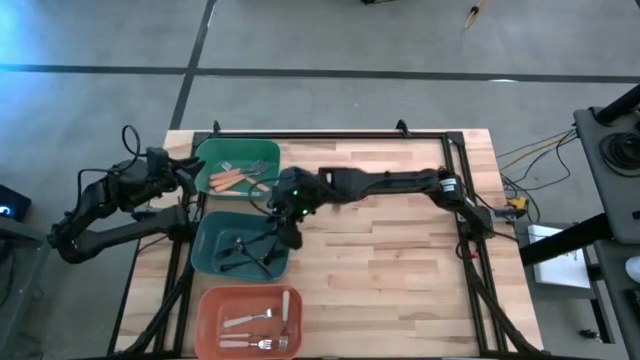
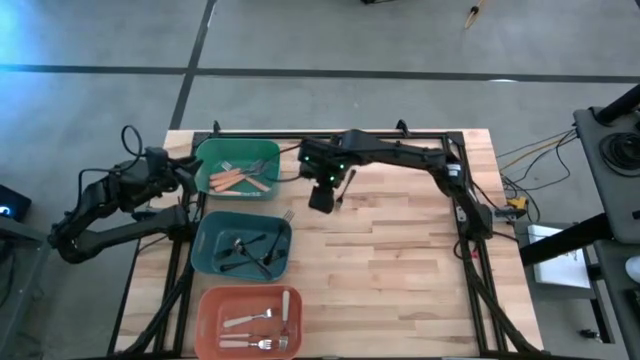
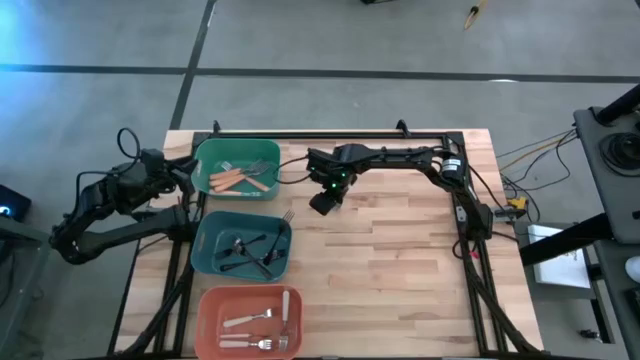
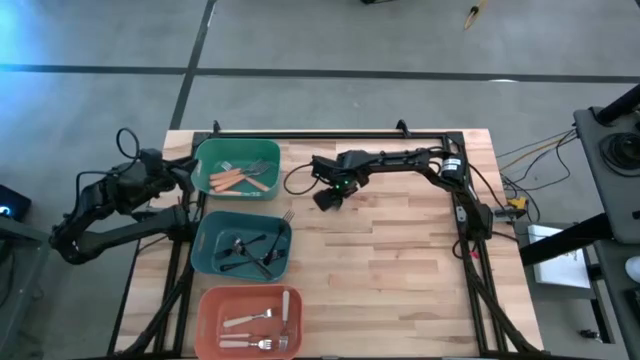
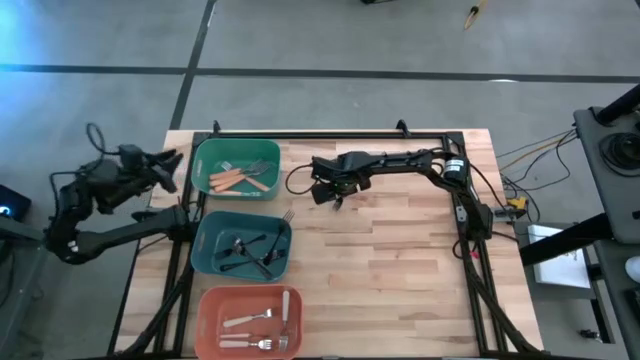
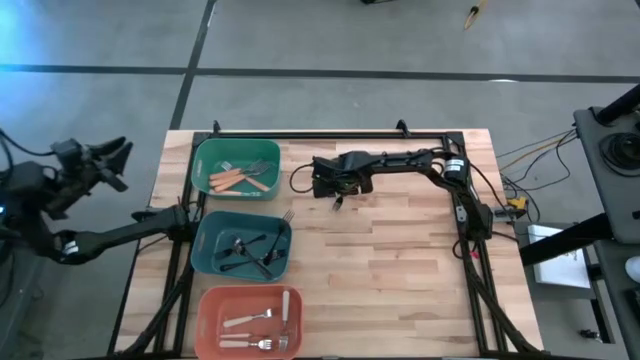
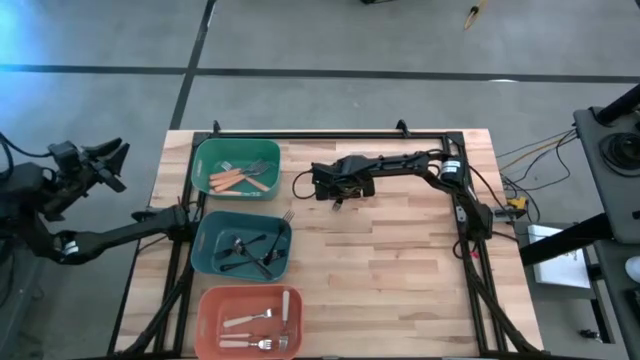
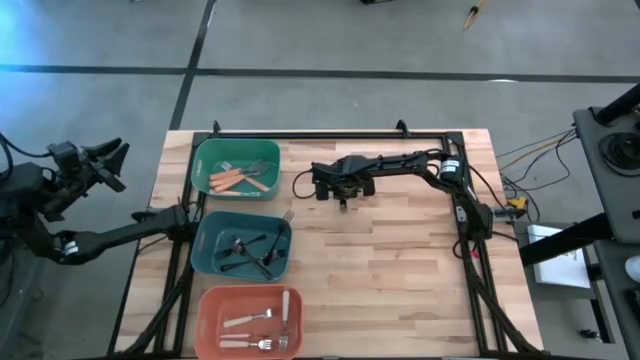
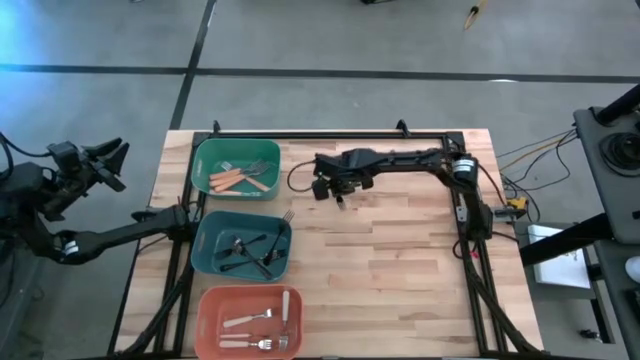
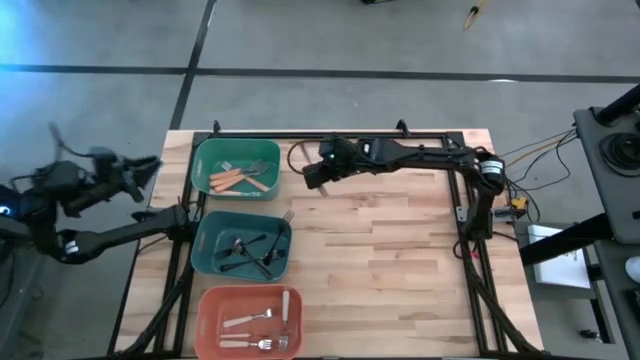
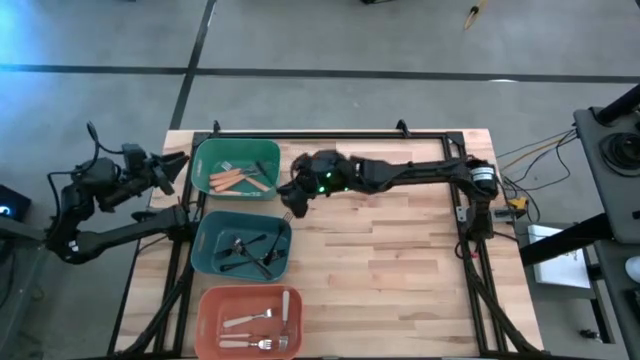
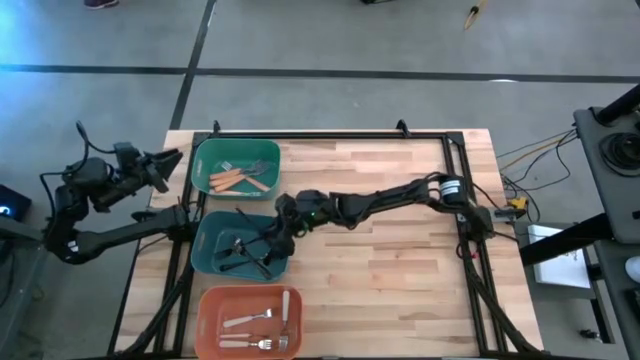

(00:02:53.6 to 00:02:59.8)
Task: Sort silverware by color (type)
Put the black fork into the blue bin

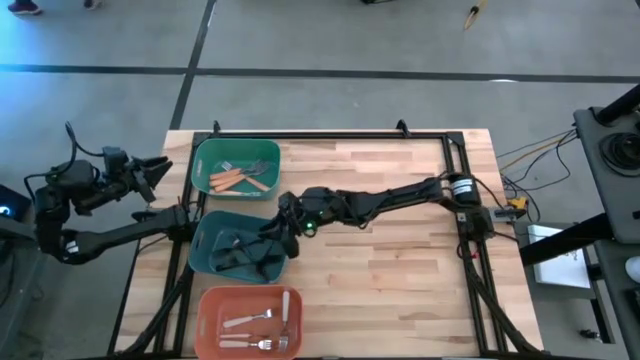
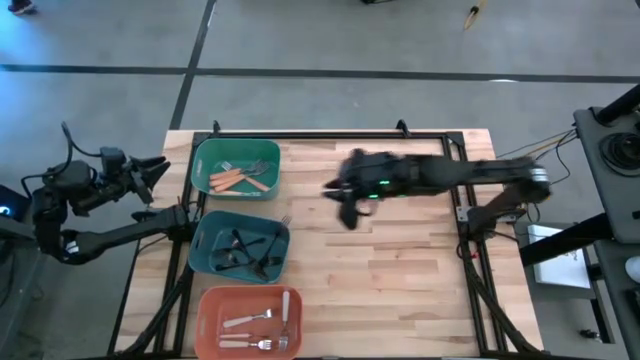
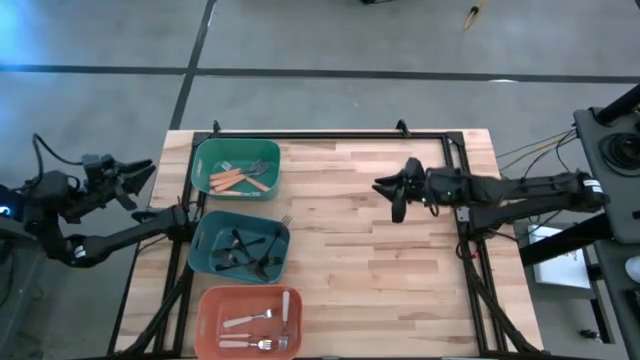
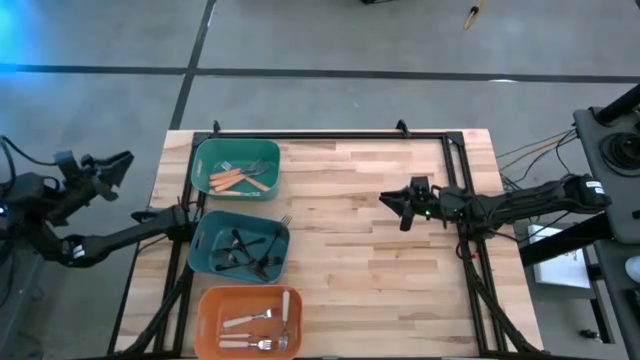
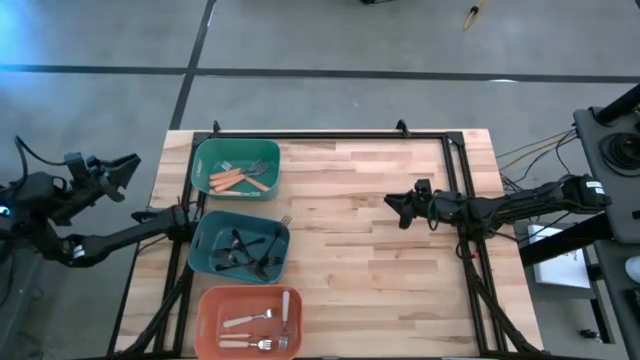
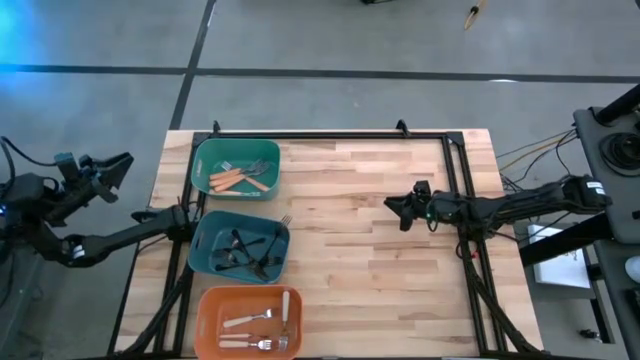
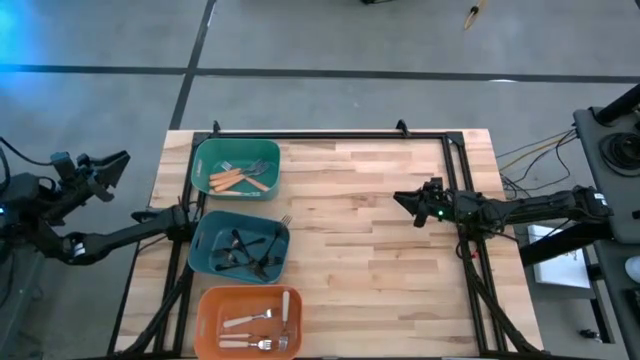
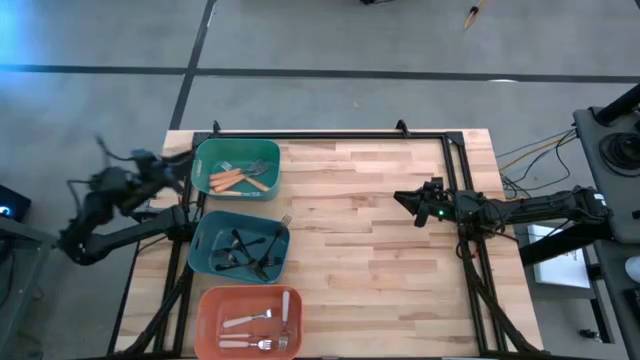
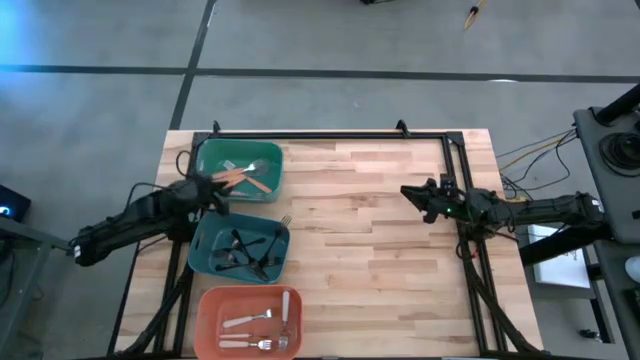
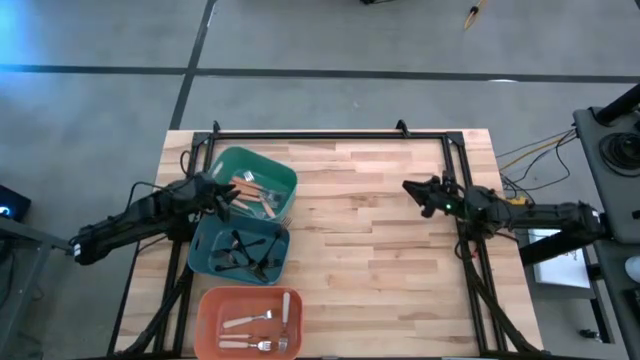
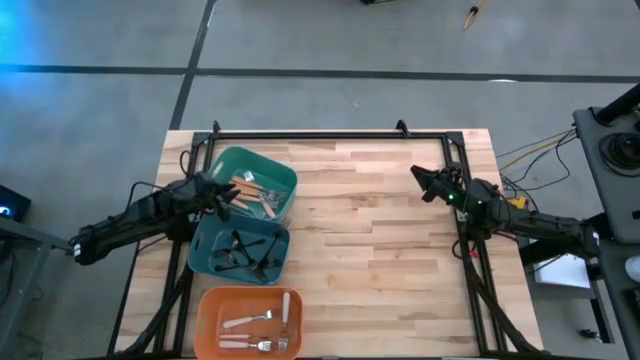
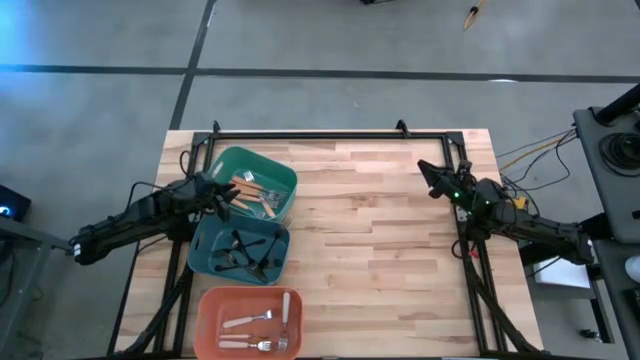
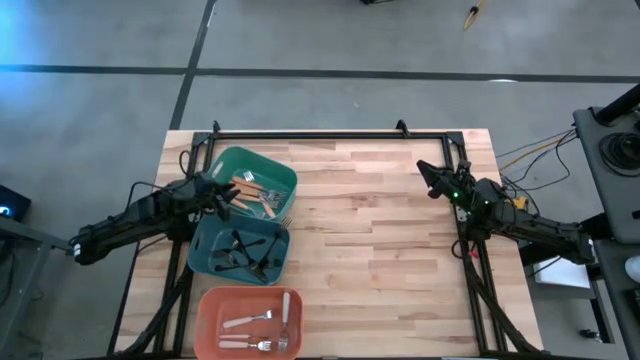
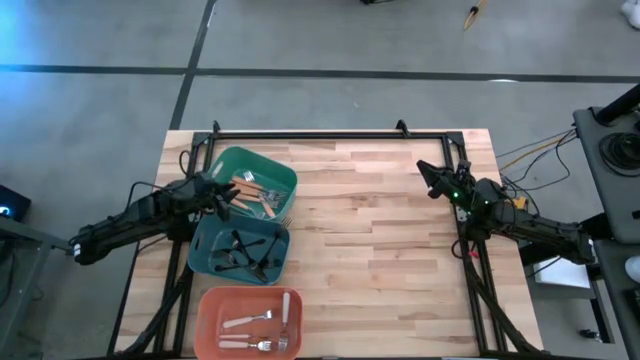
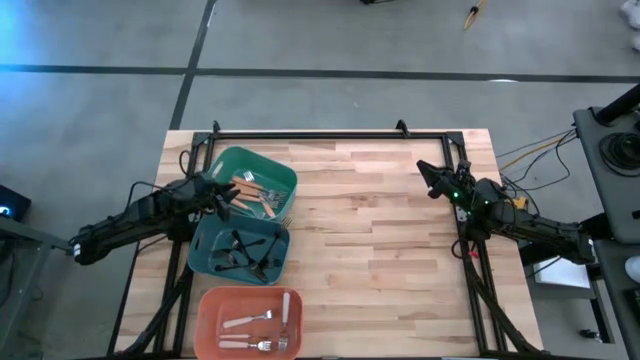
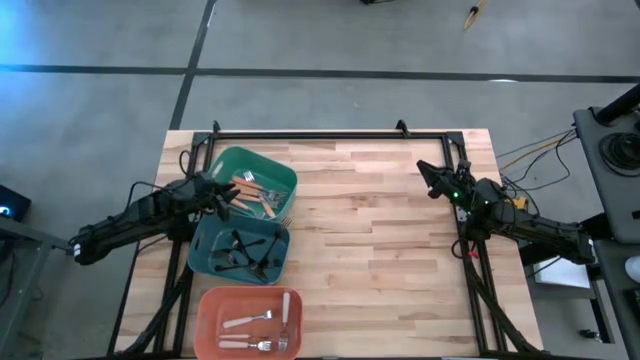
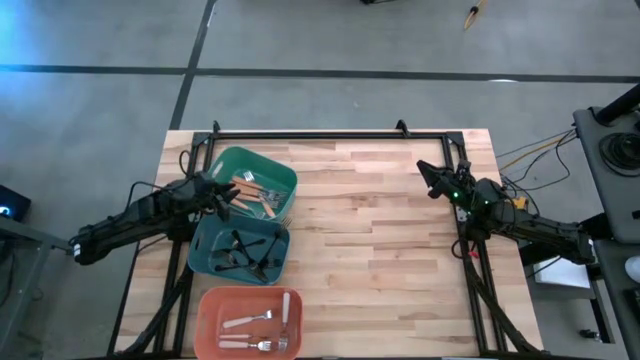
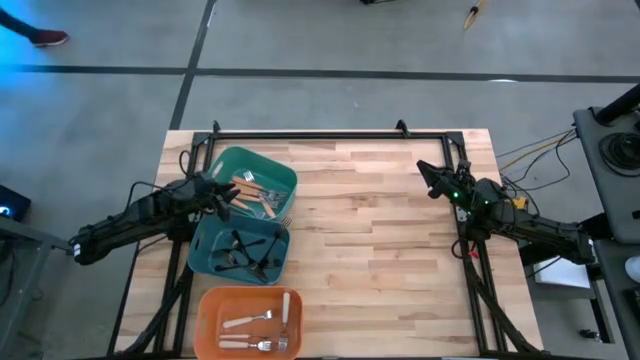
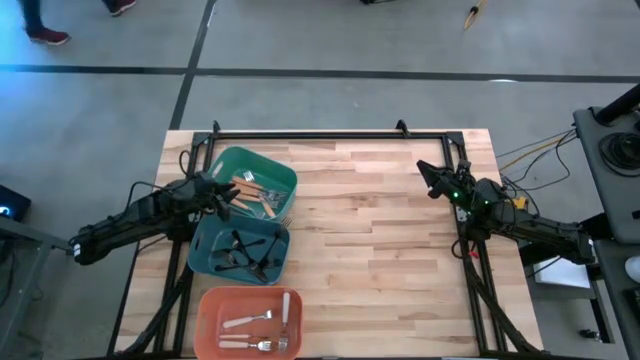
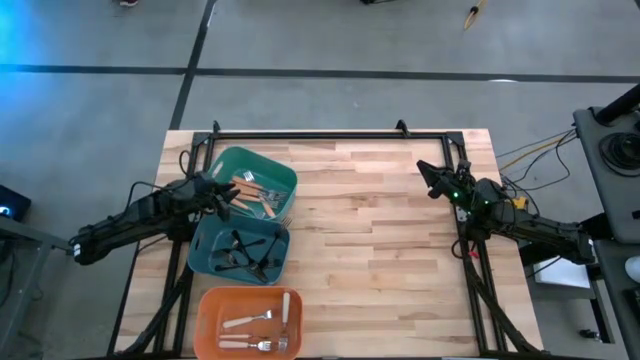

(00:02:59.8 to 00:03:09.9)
Return to Home Position

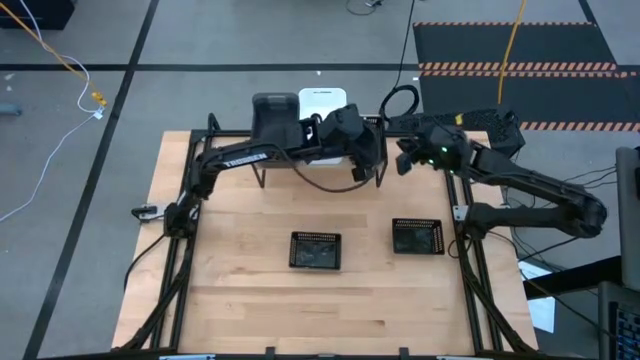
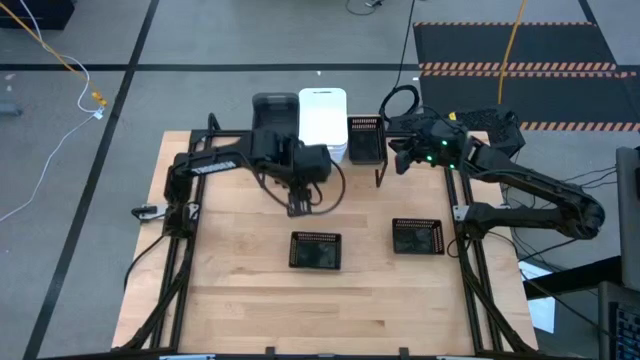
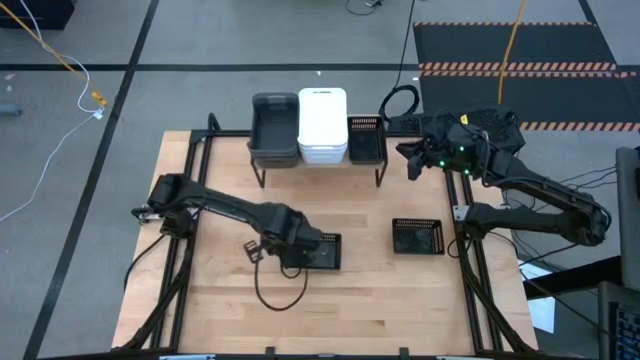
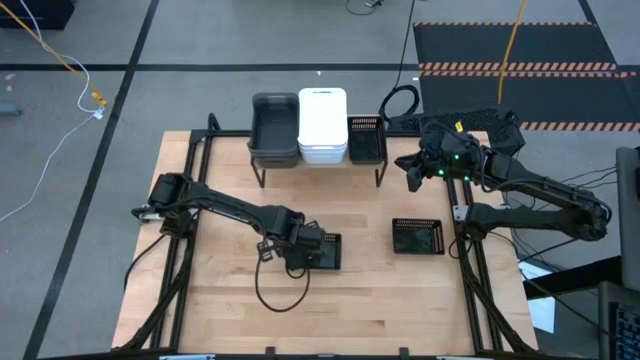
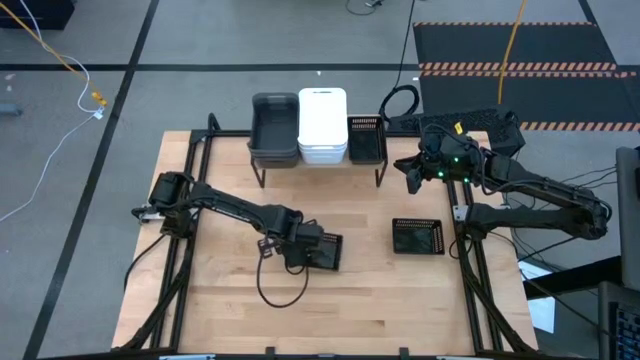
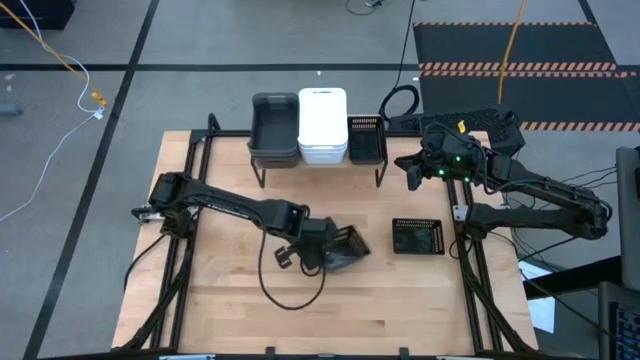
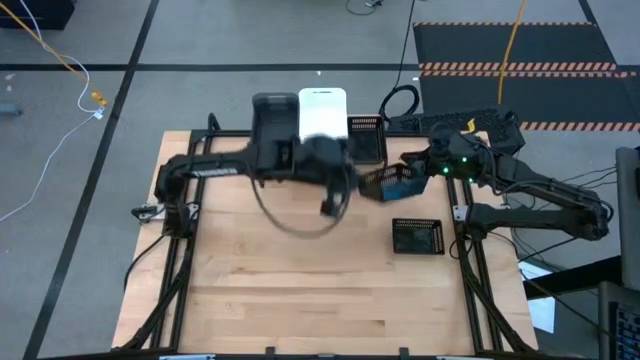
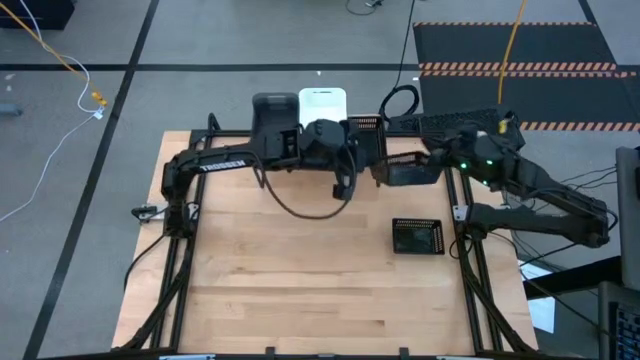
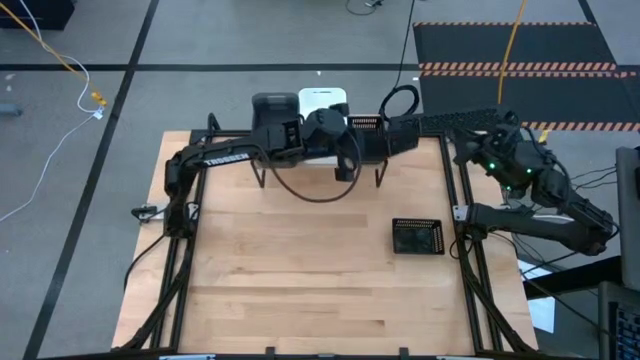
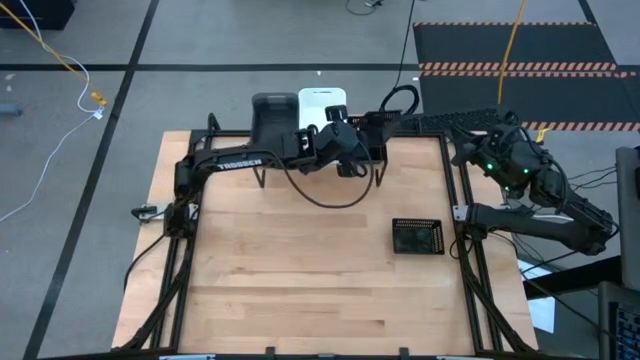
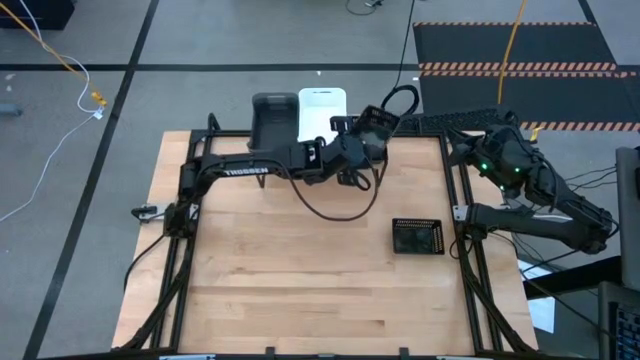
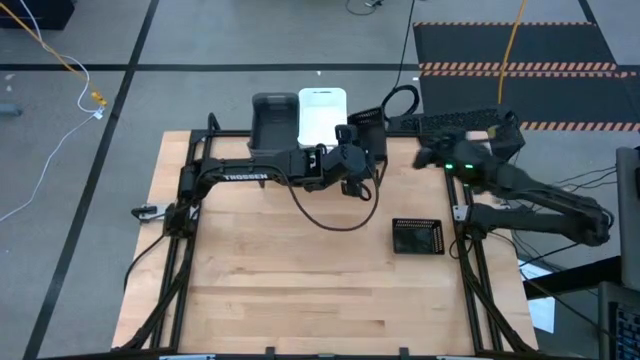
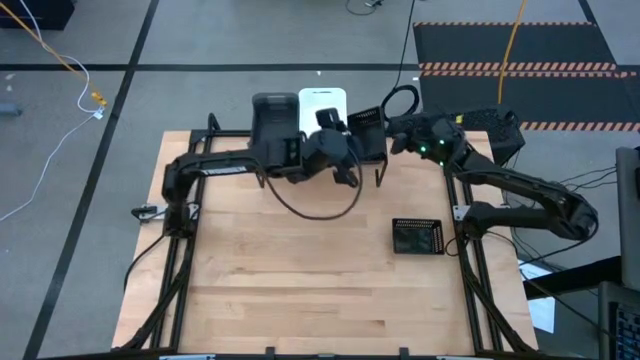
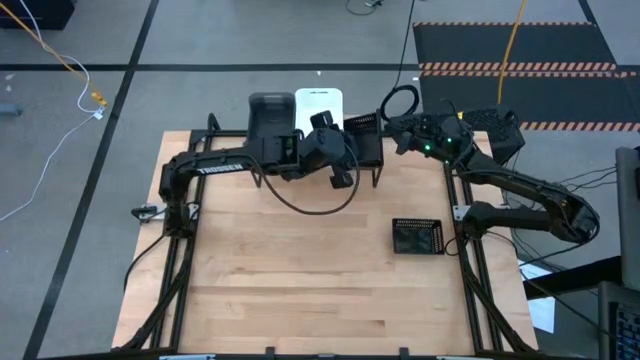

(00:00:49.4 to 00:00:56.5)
Task: Stack baskets on shelf by color
Stack the left black bin on the other black bin on the shelf
